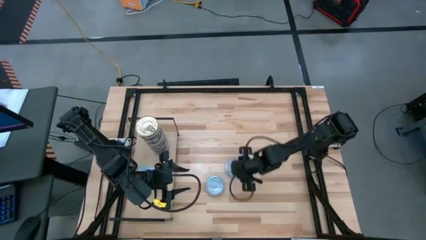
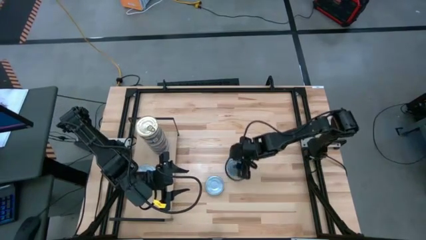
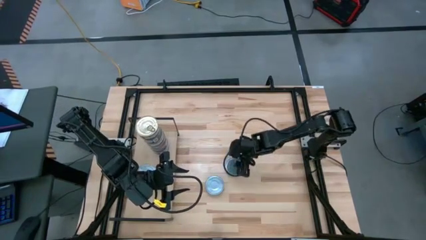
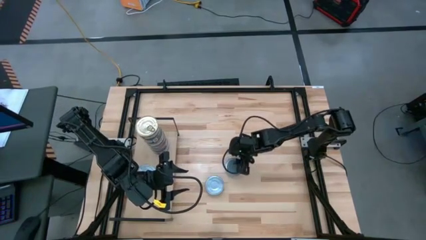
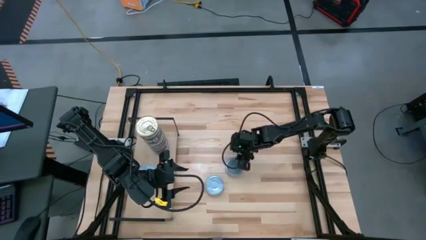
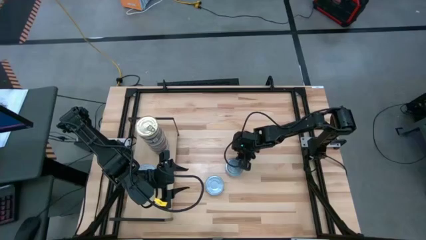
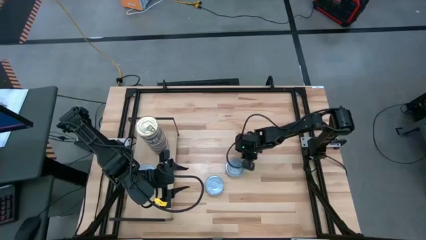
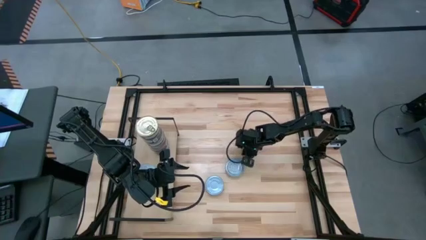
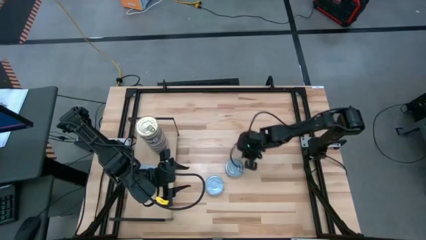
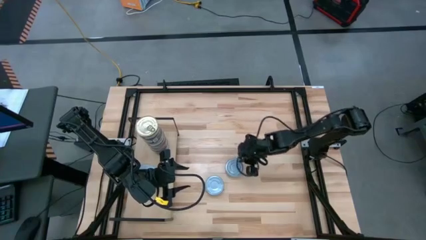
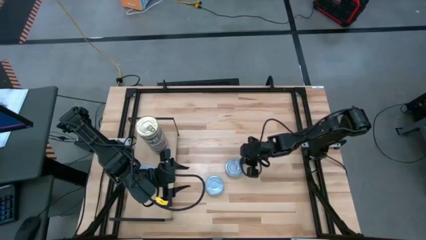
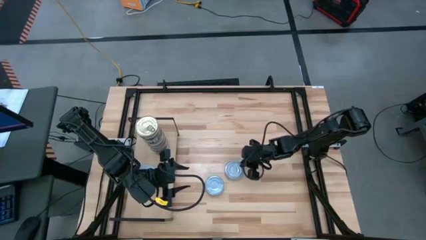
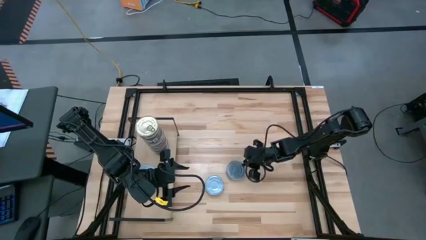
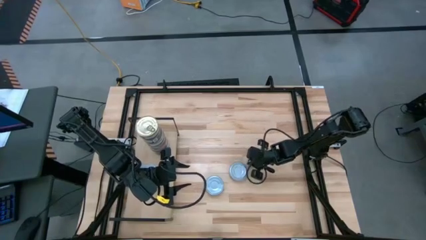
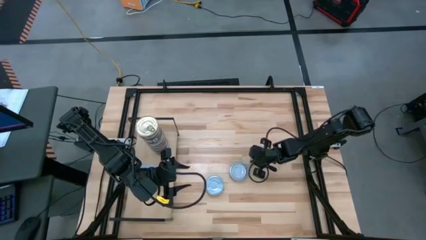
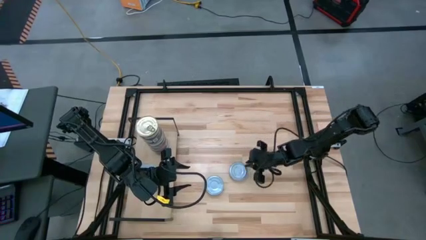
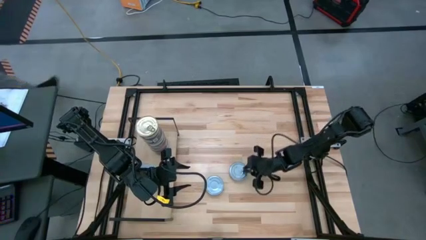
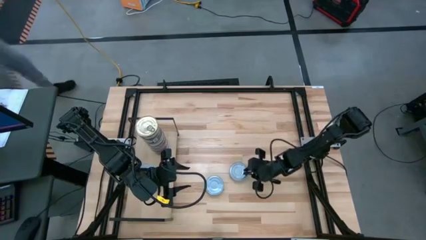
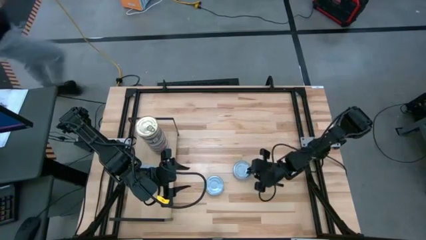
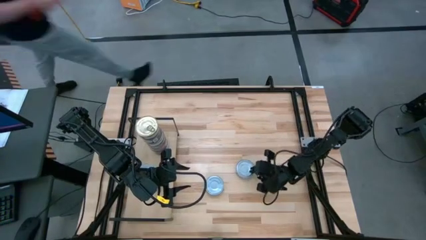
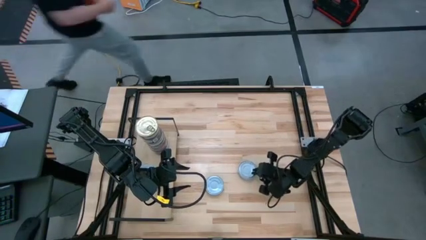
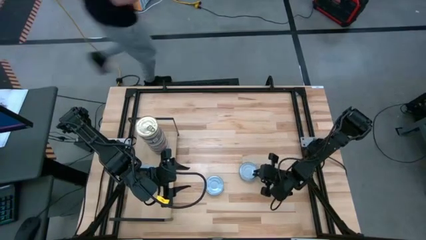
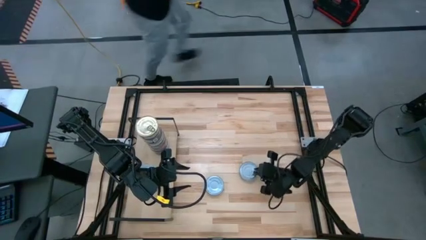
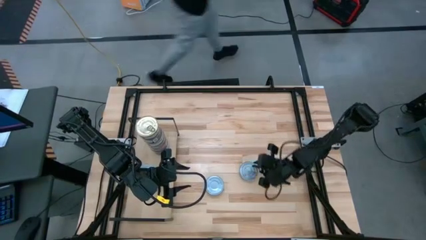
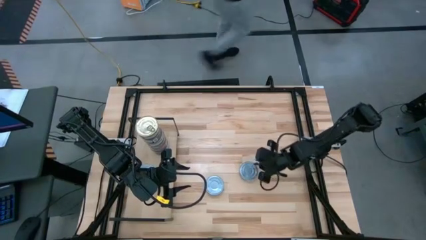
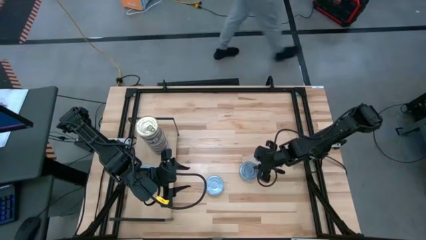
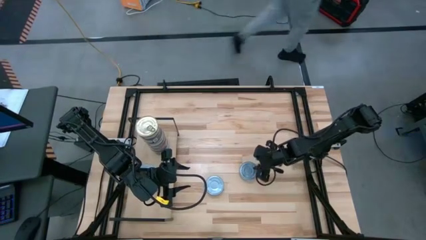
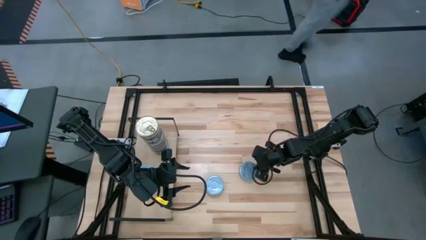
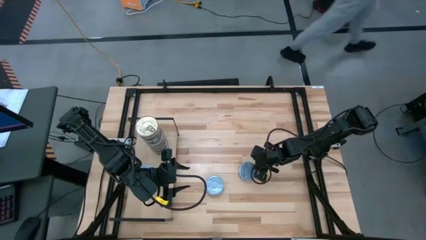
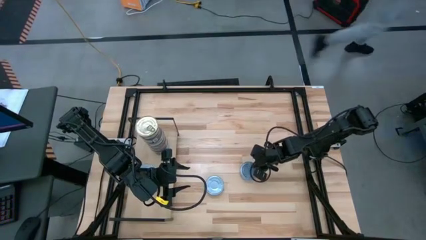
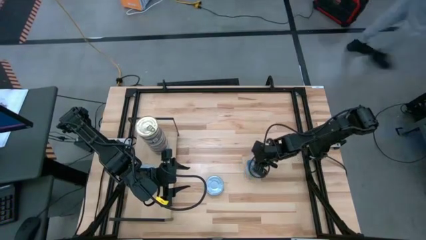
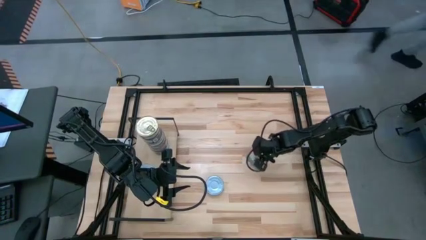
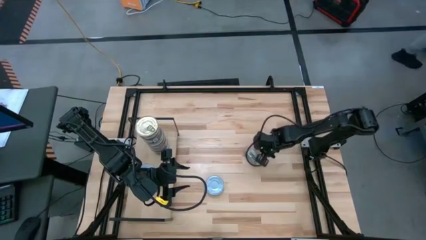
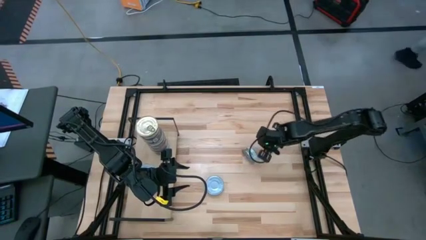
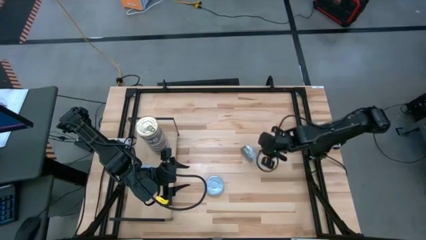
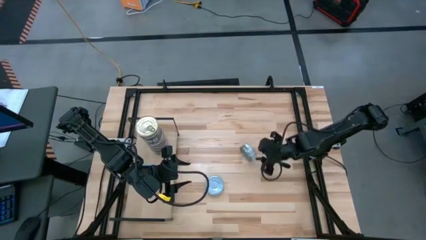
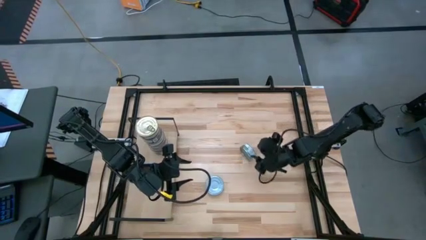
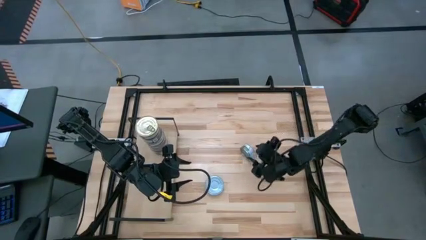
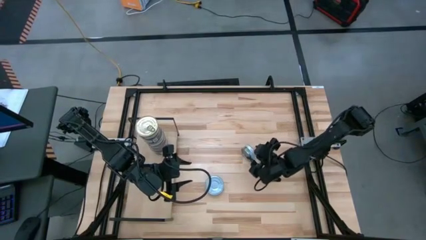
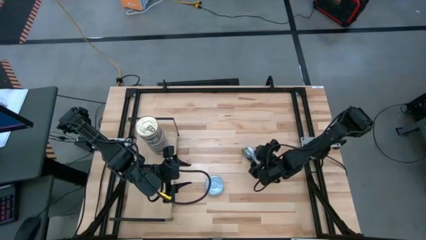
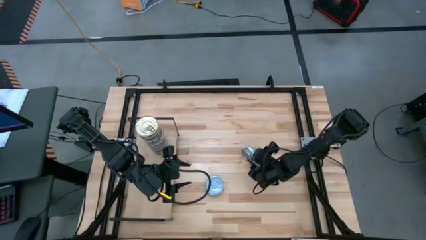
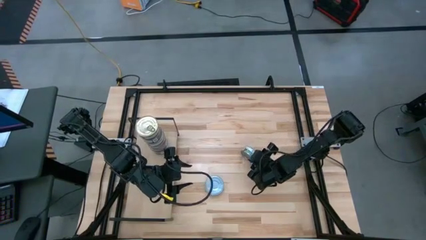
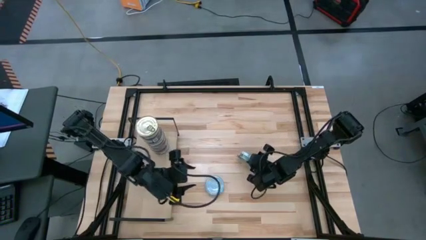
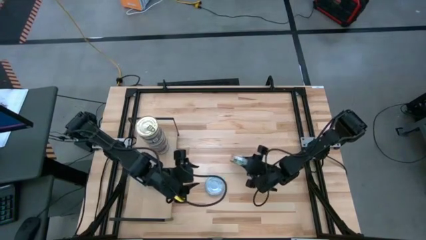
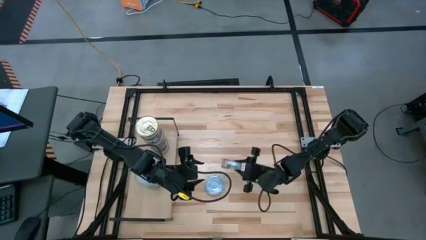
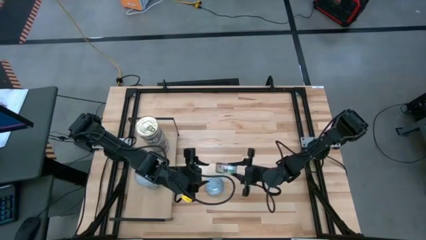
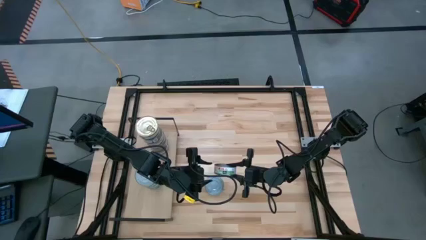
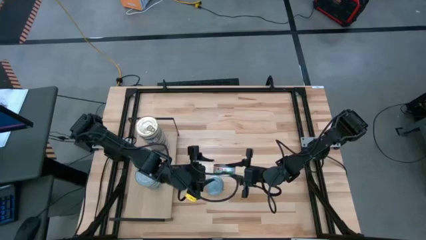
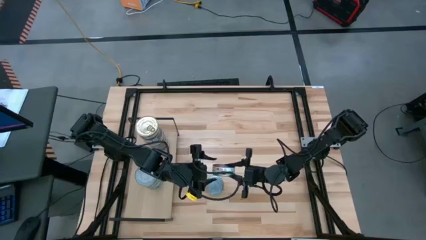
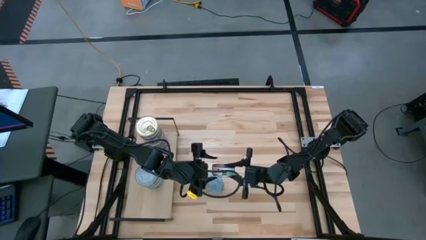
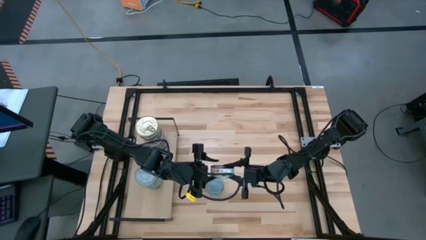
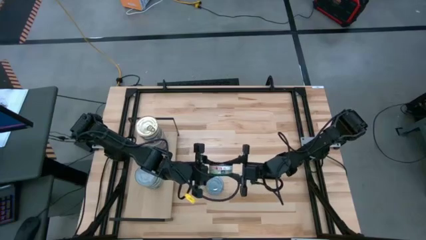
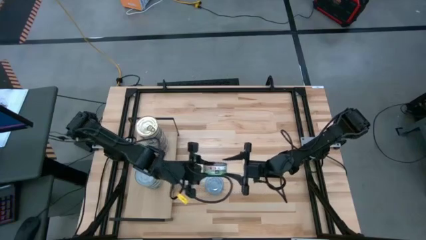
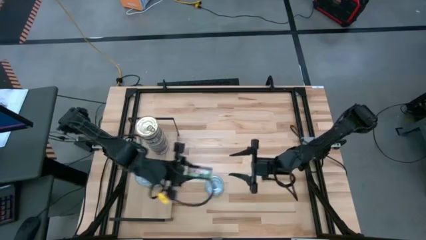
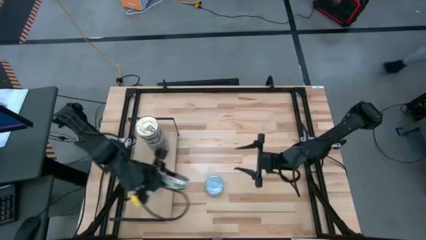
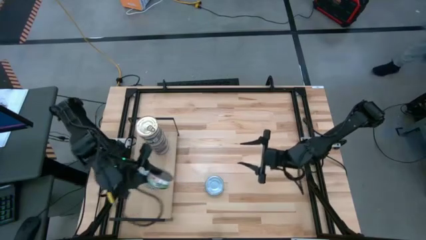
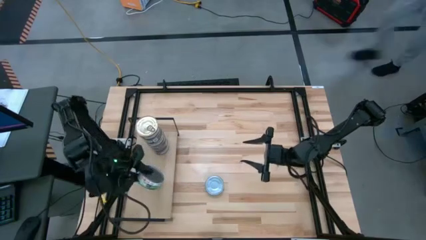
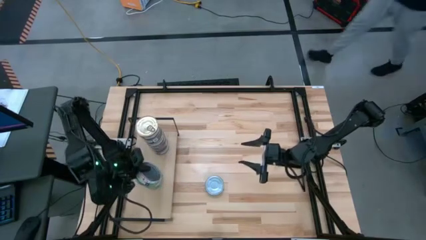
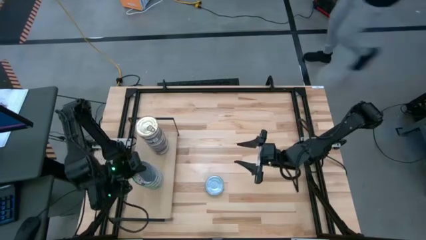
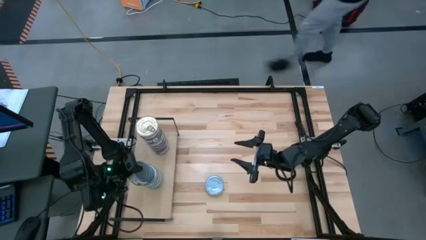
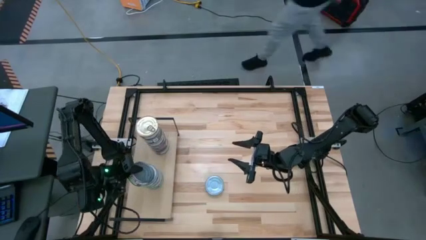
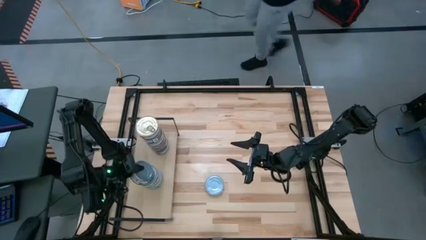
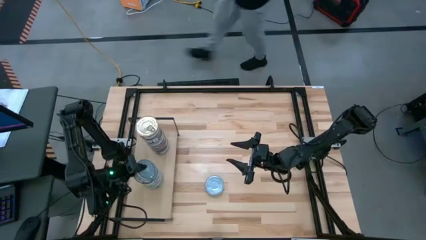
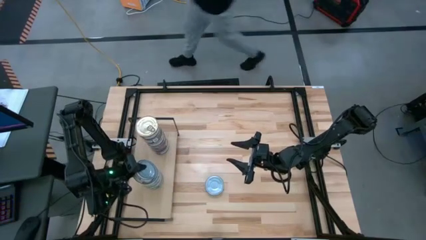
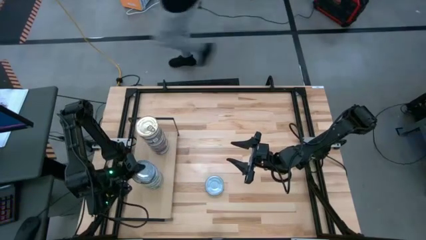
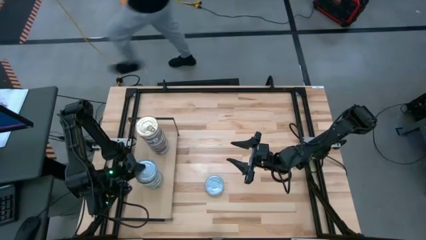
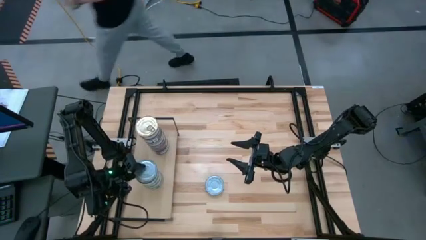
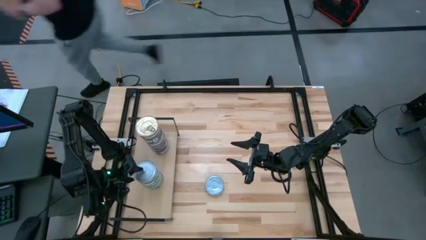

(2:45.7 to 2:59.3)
Task: Stack canned seafood by type on shelf
Stack the right green and white tuna can on the green and white tuna can on the shelf
